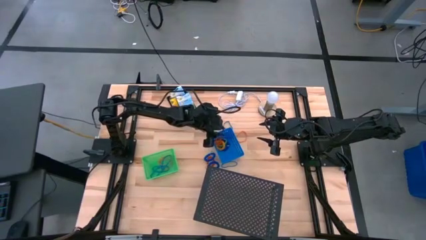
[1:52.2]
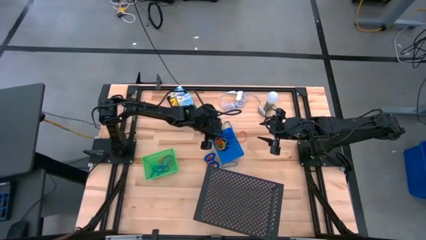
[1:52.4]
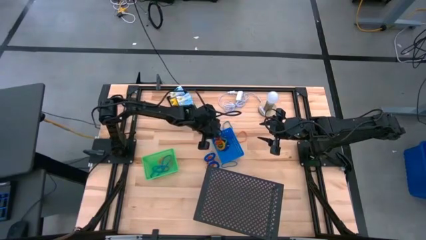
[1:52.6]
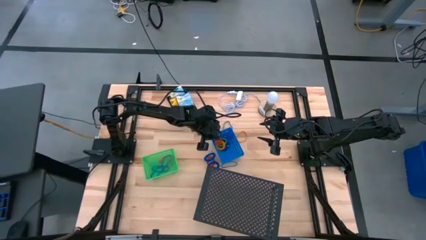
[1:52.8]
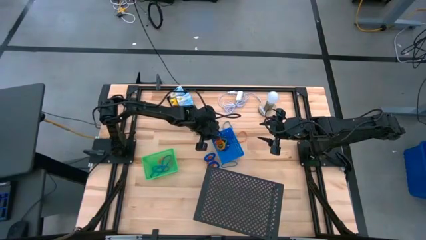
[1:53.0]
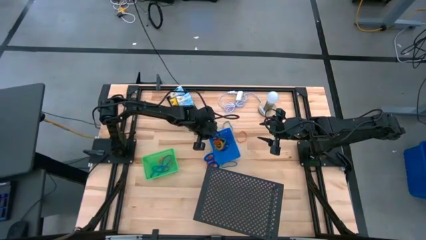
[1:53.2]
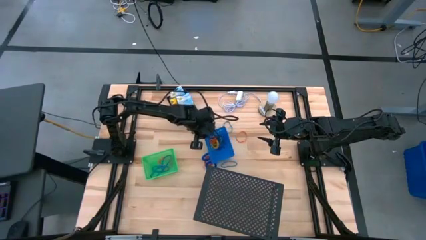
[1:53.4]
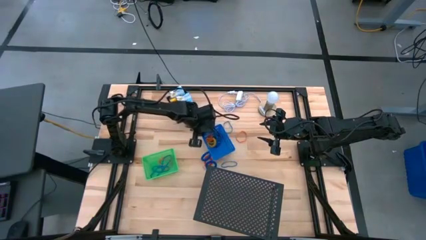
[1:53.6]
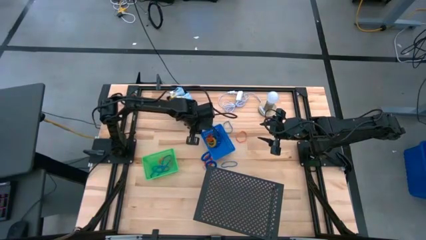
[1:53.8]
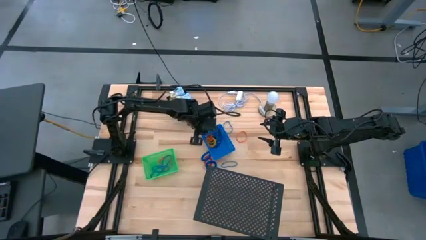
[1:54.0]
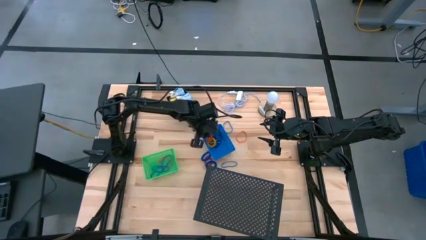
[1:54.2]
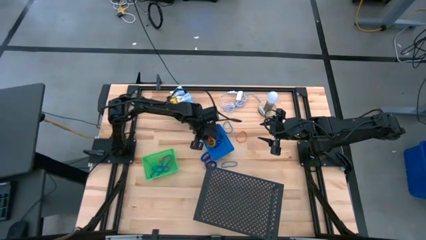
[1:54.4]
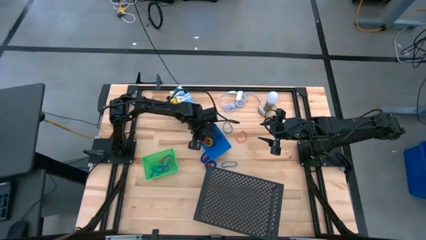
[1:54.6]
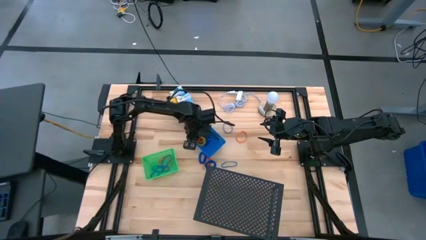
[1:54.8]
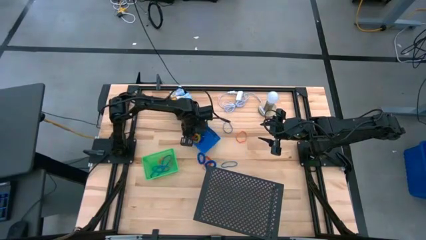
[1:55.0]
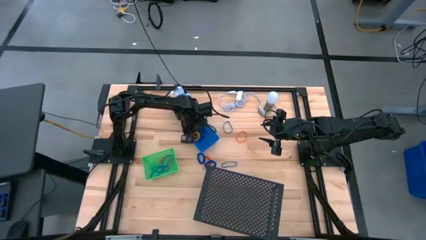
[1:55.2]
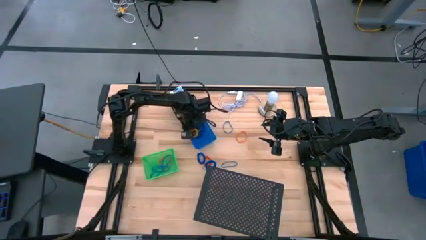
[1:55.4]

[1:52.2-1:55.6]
Task: Pick & Place Office Desk Supplies
Move the blue bin to the left

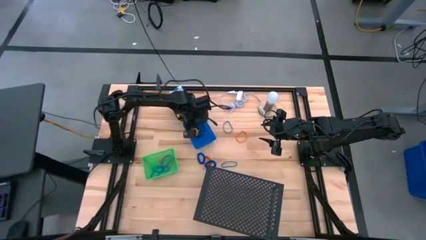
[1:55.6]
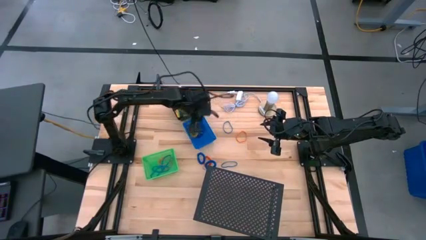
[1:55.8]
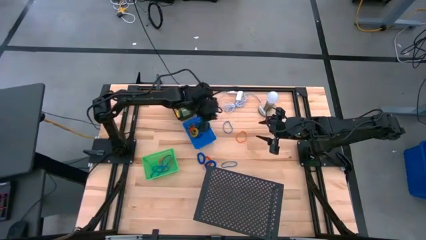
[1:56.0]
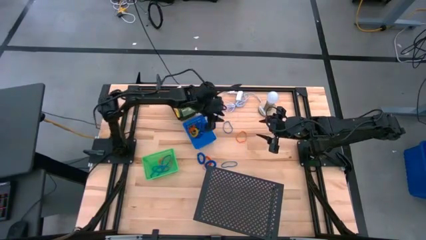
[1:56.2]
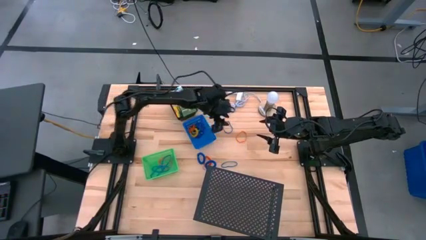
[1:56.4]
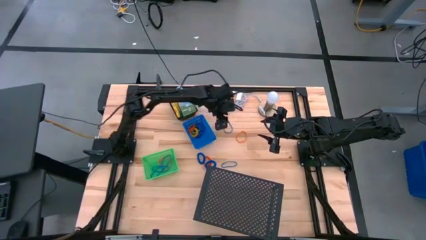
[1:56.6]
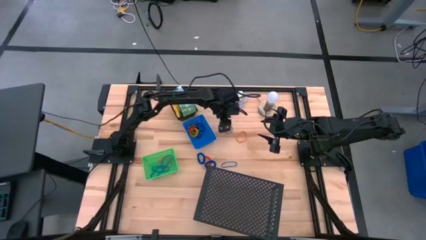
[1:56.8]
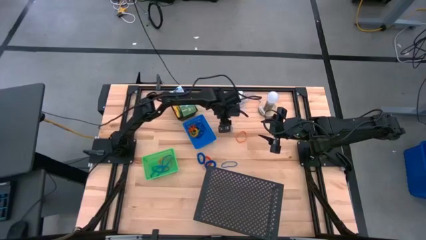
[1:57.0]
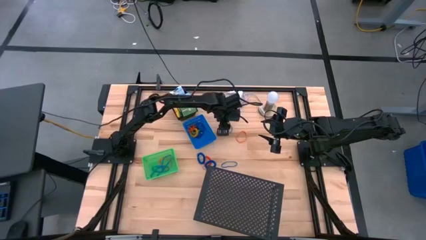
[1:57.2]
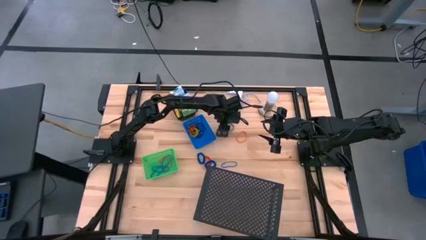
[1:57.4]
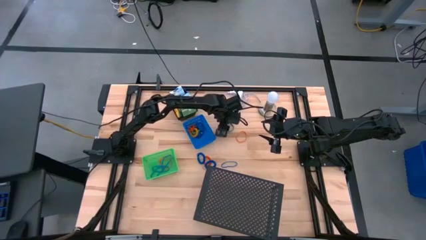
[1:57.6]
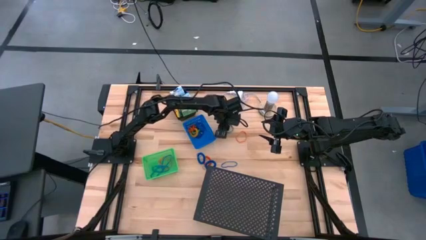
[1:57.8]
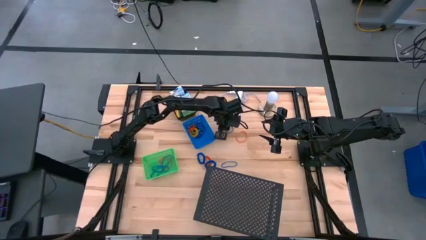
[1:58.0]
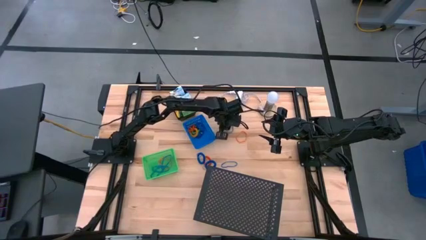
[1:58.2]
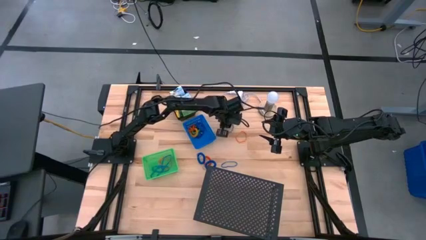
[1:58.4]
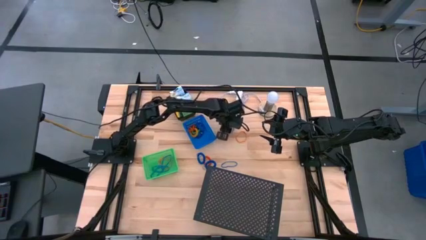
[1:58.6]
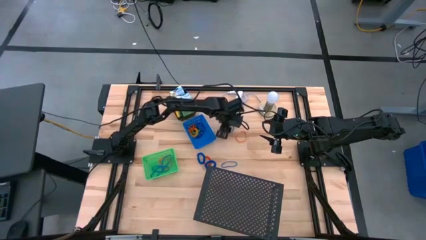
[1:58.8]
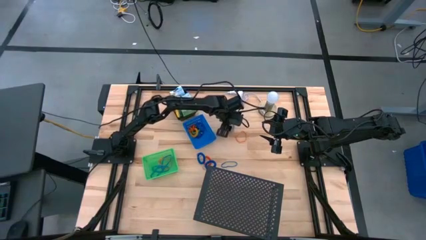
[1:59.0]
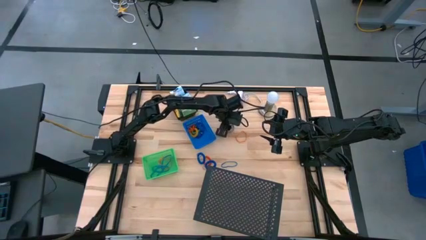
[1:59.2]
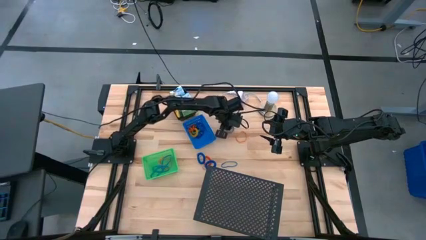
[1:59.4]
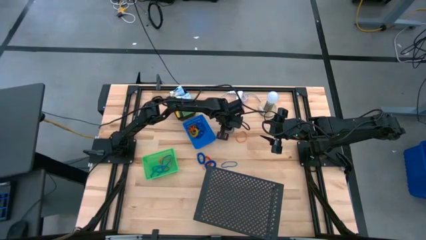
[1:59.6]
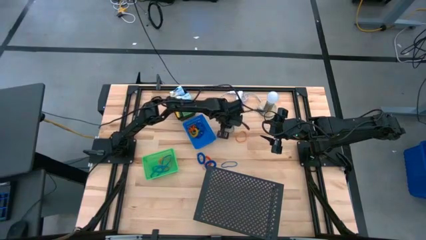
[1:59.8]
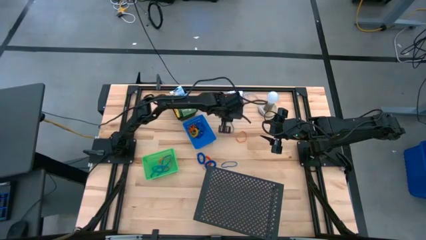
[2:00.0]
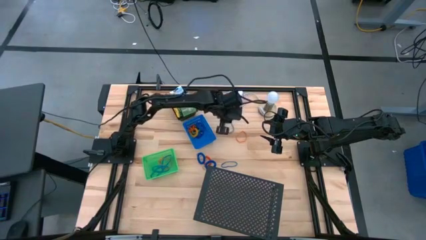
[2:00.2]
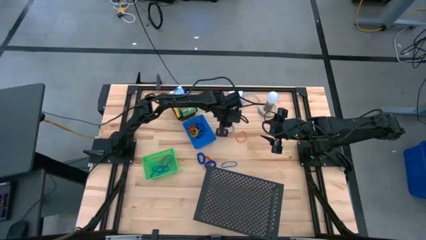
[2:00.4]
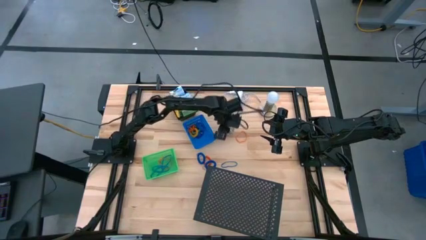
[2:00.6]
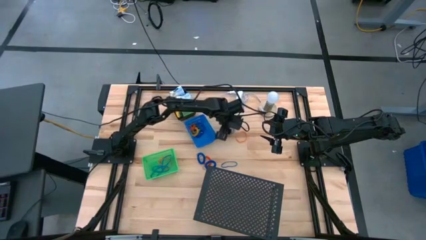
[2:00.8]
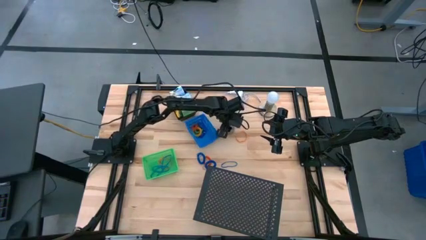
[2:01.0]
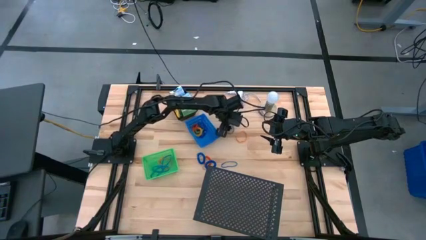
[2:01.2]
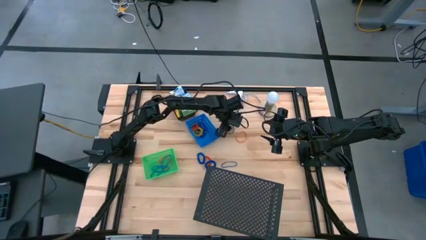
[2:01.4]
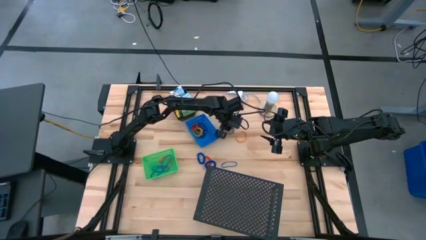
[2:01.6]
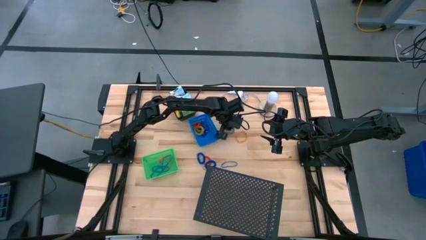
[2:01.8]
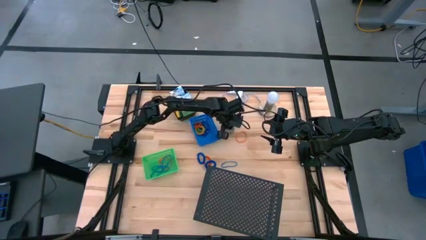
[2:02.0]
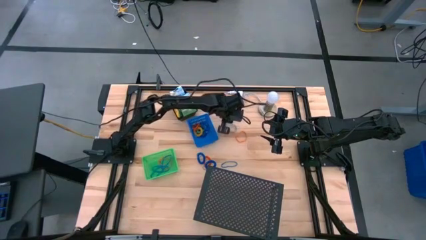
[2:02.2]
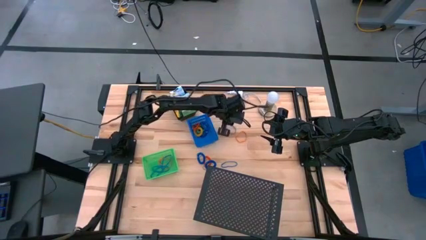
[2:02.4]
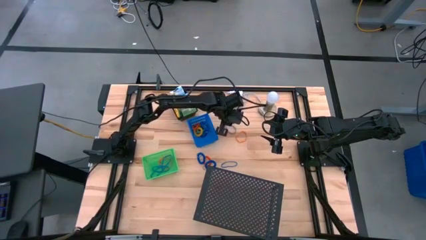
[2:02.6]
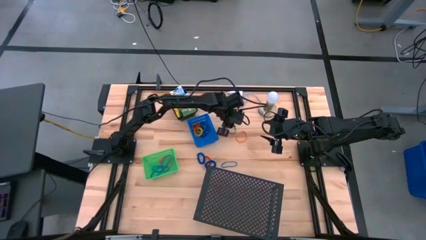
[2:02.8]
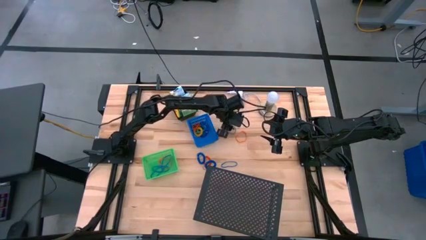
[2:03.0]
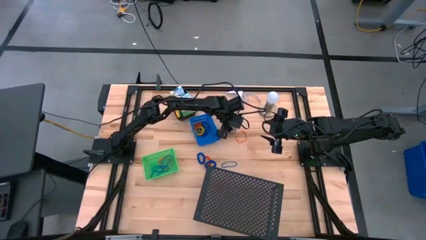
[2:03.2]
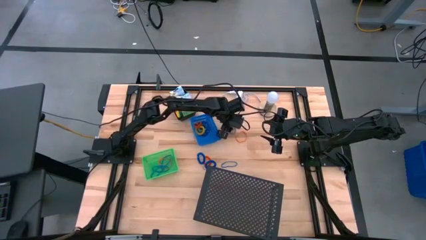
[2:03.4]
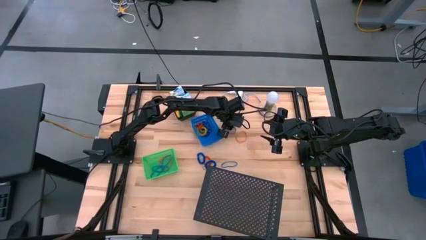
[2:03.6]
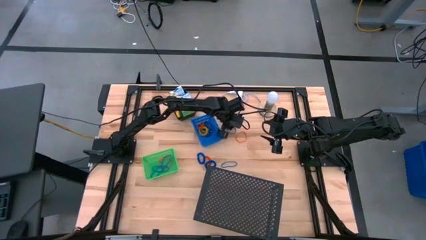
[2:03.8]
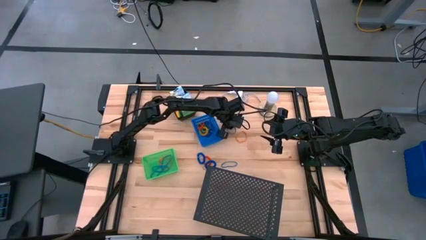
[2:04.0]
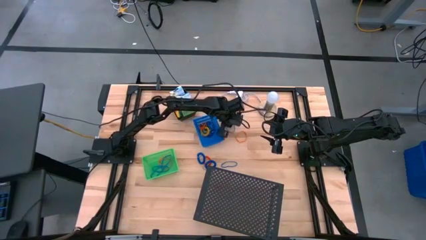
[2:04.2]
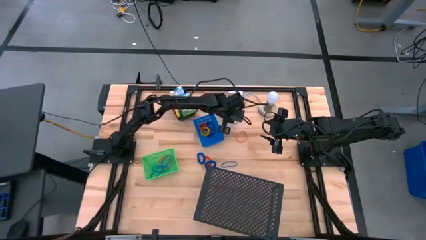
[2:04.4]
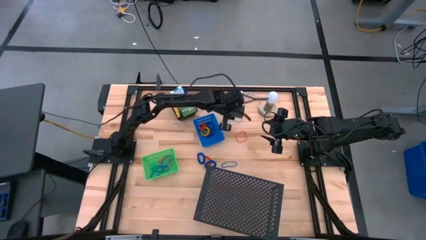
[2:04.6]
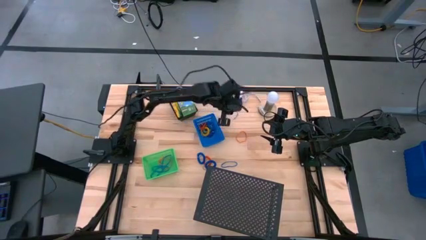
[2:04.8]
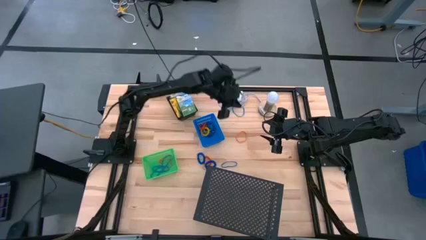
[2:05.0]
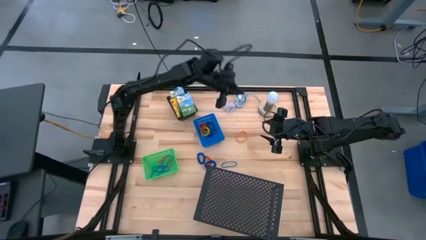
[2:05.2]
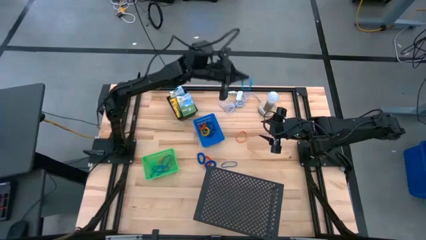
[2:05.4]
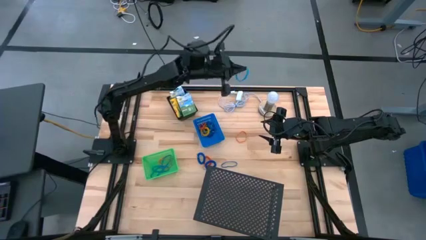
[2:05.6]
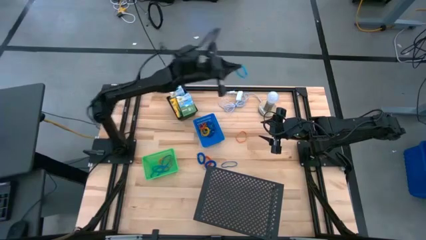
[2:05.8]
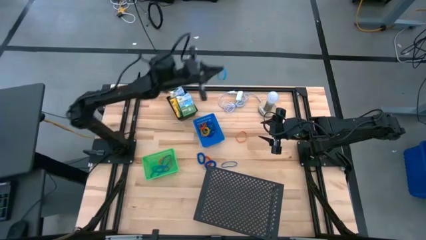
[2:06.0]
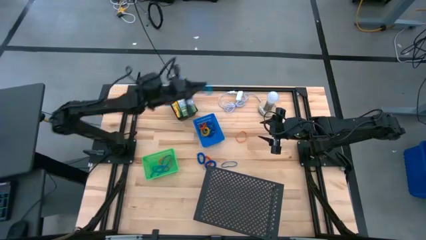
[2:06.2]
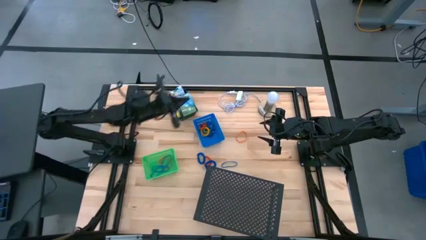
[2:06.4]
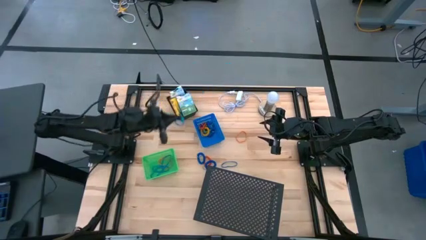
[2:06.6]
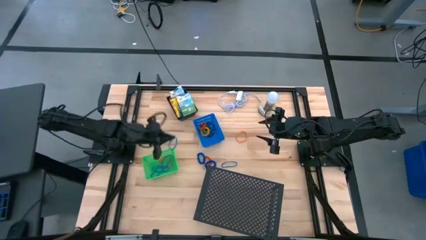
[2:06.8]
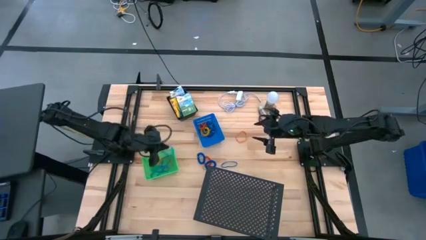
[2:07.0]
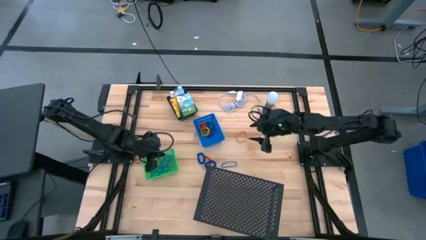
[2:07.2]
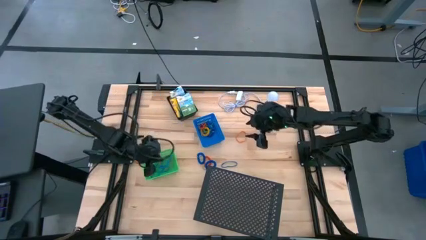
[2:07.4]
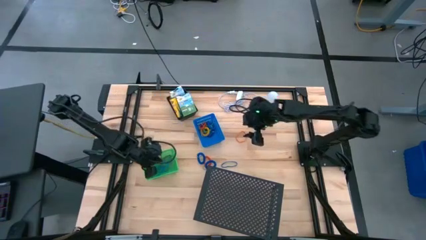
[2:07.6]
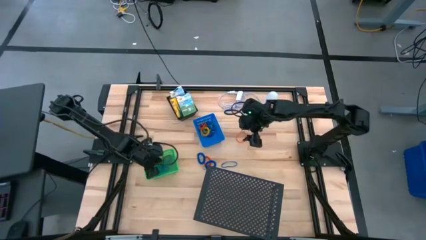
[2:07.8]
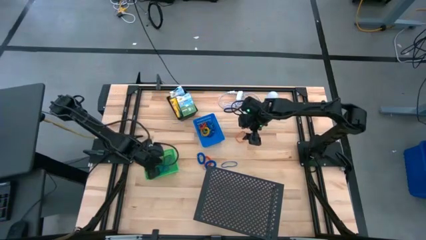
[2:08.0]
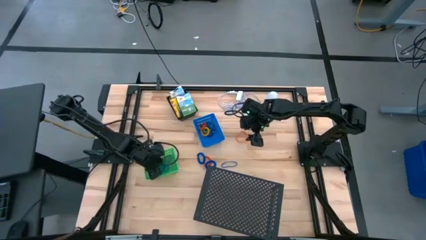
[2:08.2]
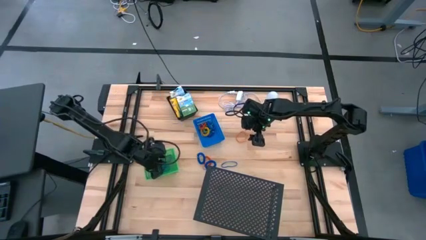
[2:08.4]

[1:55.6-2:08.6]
Put the top blue rubber band into the green bin

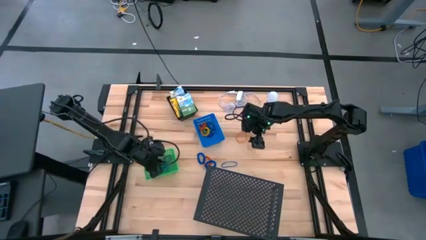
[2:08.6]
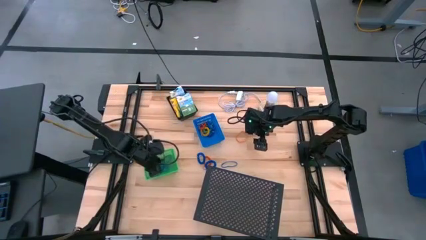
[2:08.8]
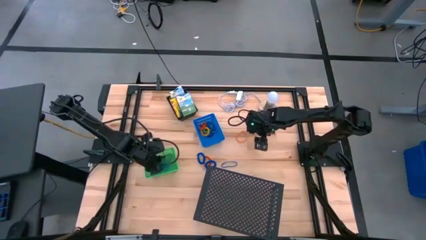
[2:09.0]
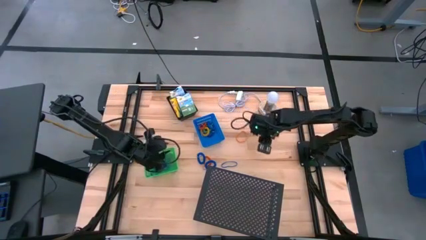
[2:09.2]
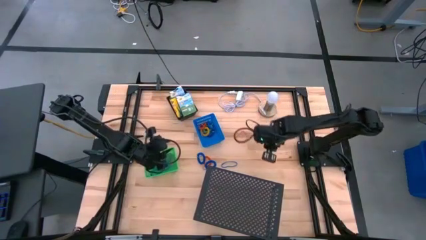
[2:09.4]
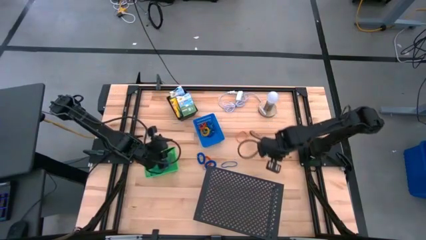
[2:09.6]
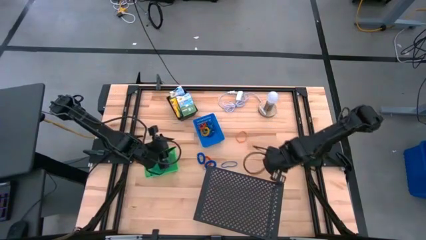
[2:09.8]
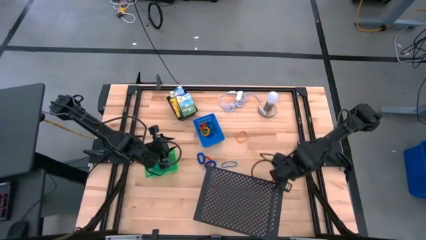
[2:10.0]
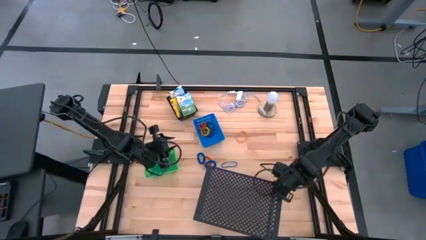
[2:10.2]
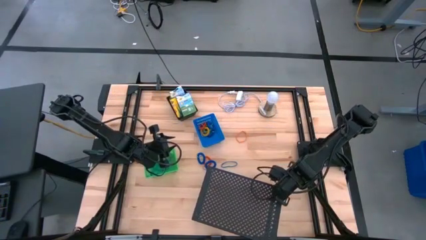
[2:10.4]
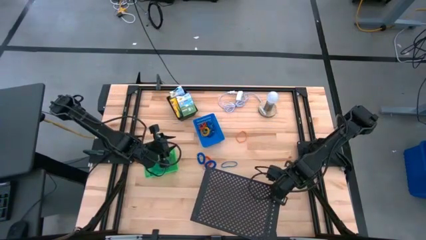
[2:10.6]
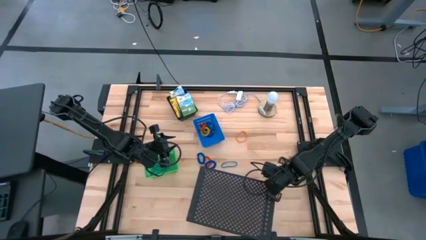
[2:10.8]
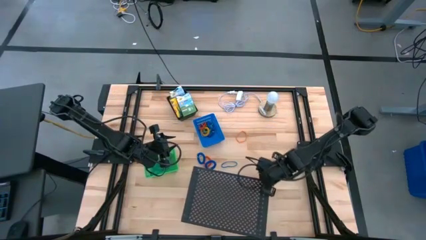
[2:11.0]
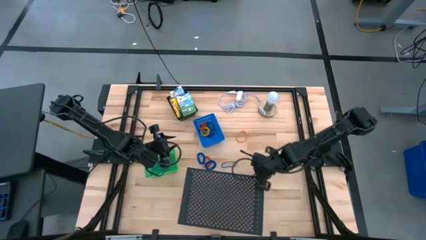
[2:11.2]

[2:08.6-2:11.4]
Adjust the position of the shelf
